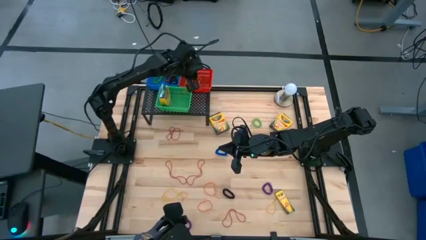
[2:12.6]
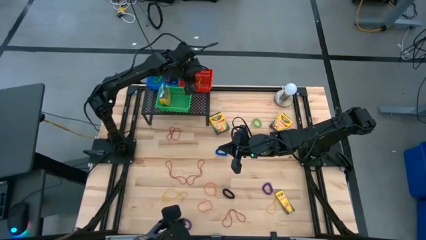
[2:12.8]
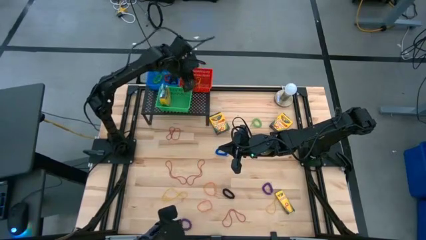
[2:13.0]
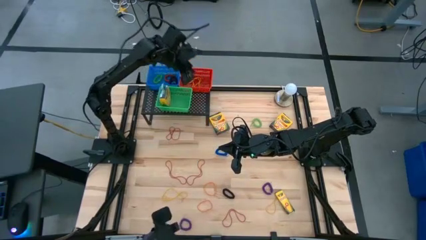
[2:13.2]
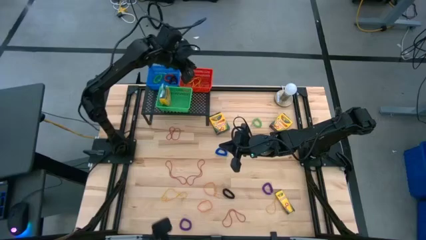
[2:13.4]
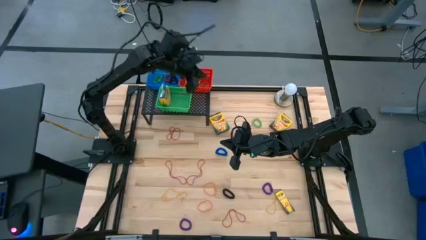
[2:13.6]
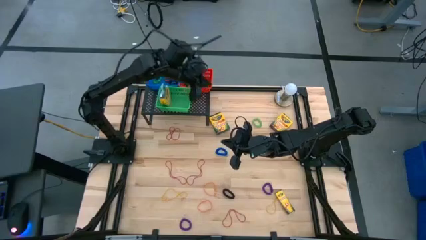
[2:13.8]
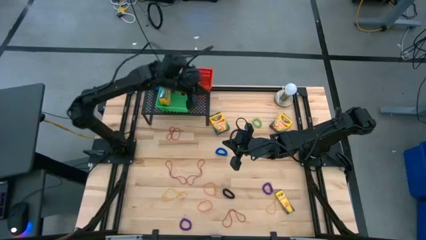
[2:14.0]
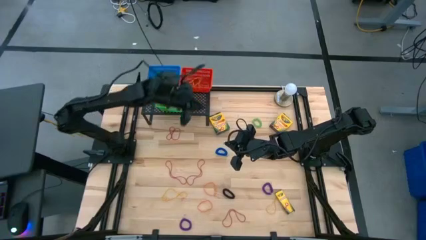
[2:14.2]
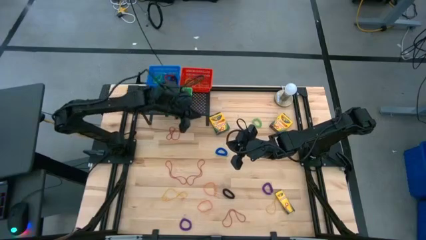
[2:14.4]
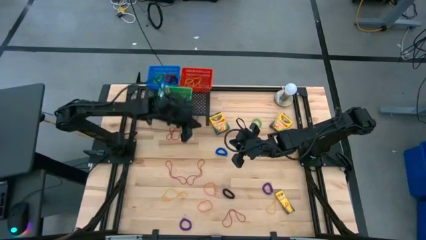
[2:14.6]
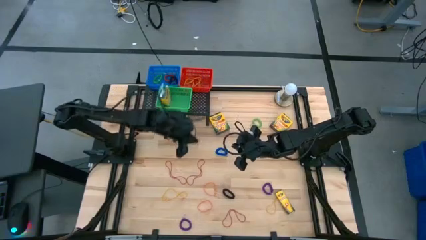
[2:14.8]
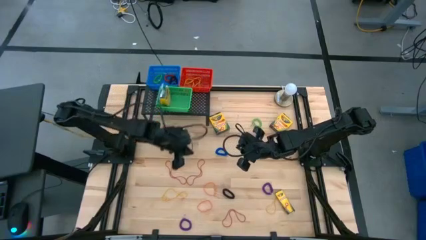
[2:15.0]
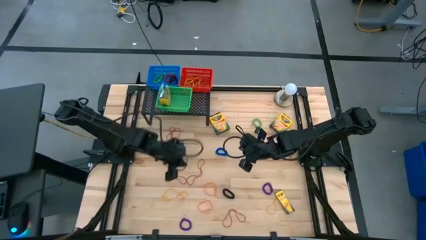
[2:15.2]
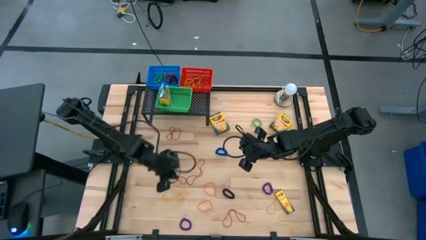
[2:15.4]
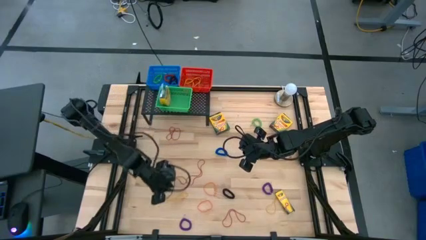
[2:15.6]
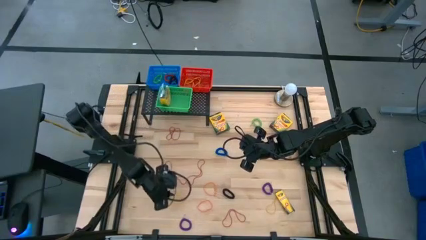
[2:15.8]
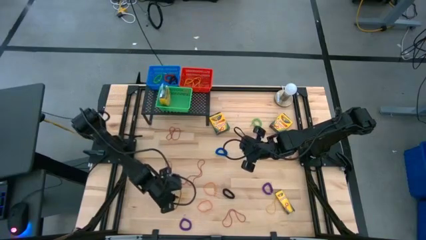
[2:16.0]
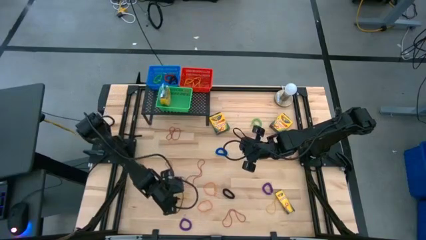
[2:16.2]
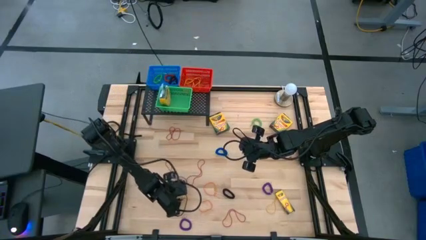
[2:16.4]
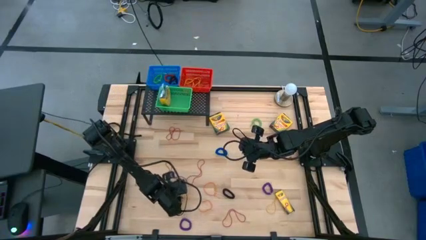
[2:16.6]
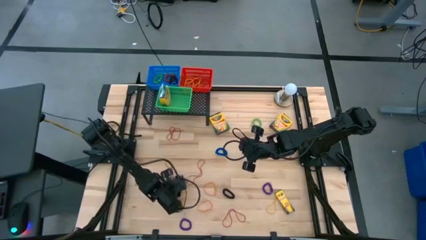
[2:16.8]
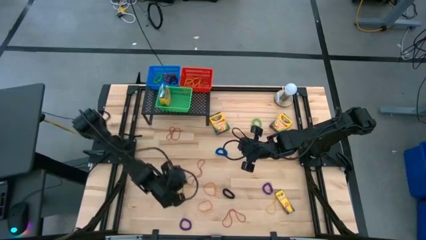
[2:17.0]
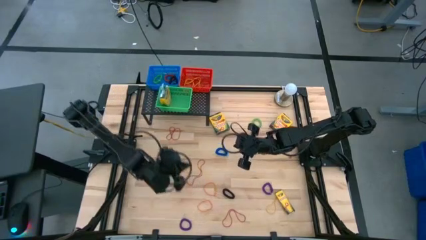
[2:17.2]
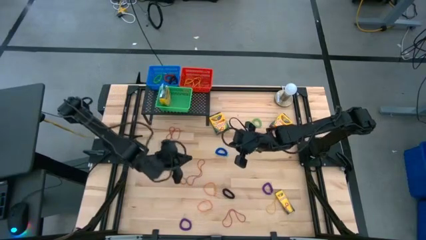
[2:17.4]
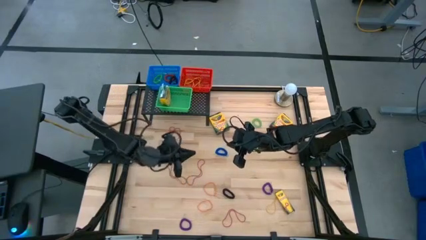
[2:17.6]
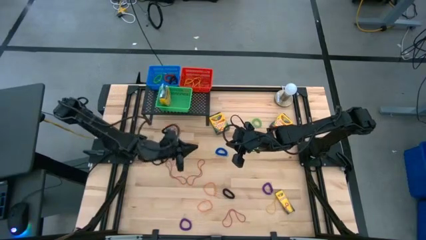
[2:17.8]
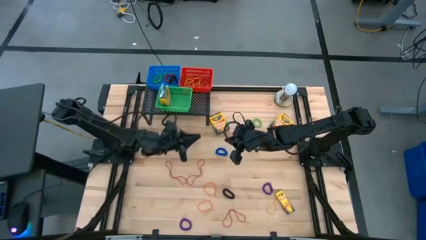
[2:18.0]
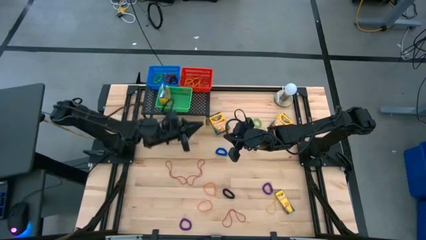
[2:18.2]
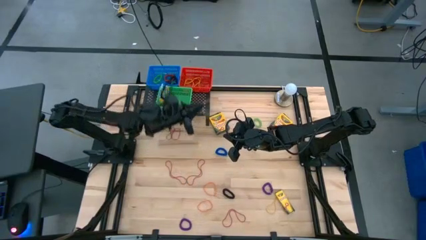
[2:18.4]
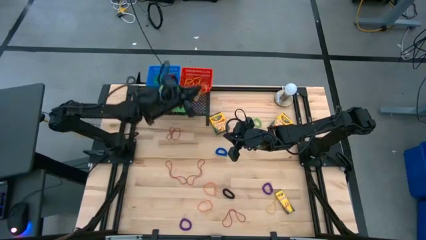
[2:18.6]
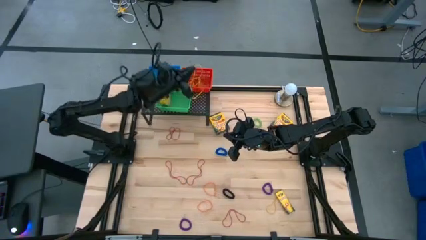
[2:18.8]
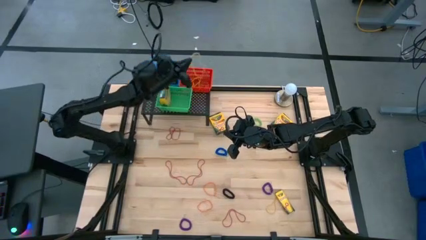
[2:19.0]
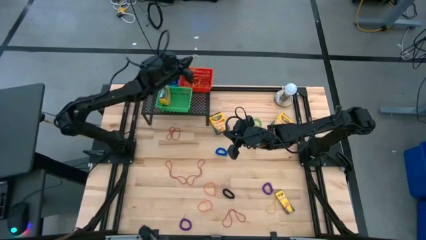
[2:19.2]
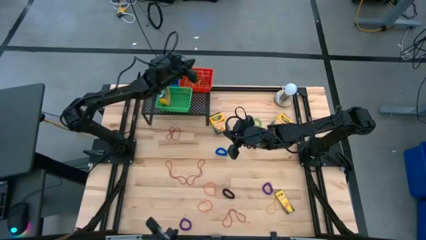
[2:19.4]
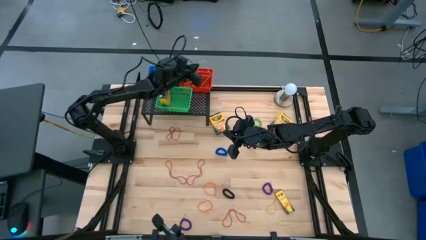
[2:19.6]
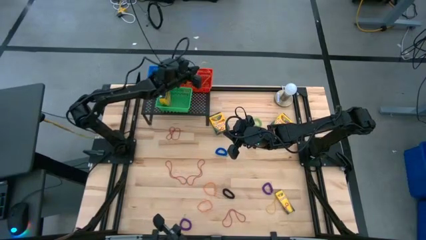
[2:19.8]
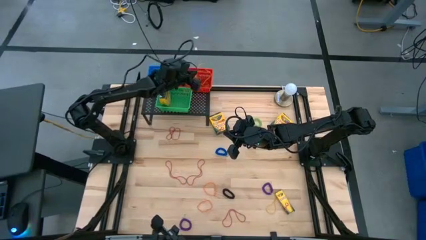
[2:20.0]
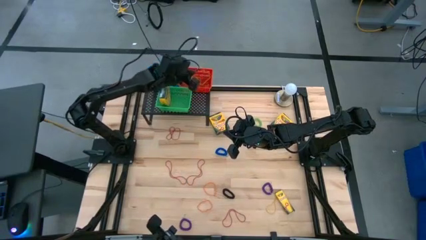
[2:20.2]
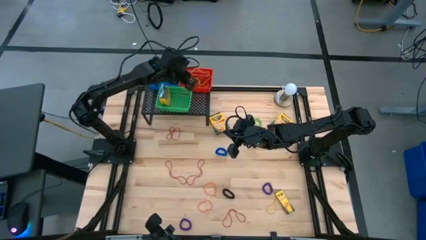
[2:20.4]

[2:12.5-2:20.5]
Task: Pick & Place Office Desk Supplies
Put the yellow rubber band into the red bin

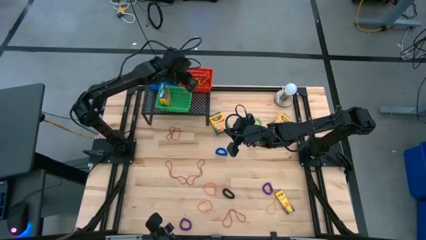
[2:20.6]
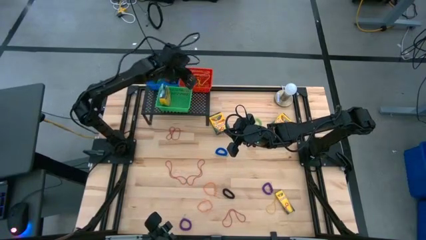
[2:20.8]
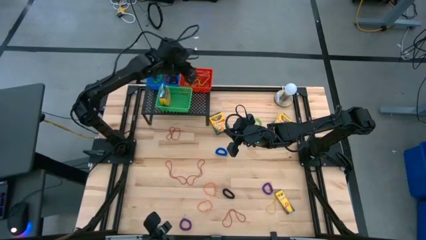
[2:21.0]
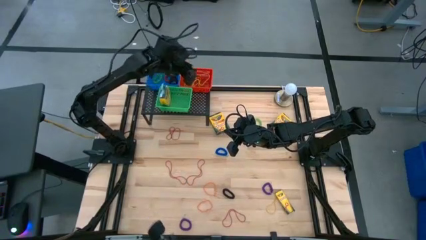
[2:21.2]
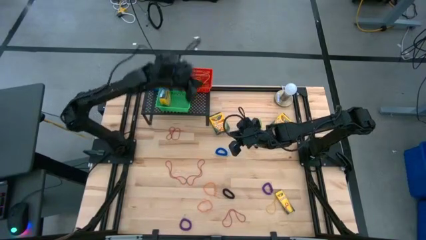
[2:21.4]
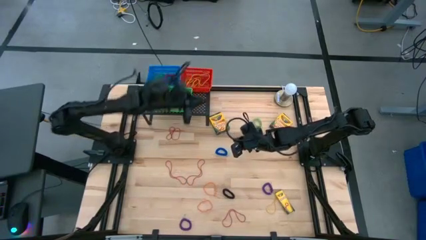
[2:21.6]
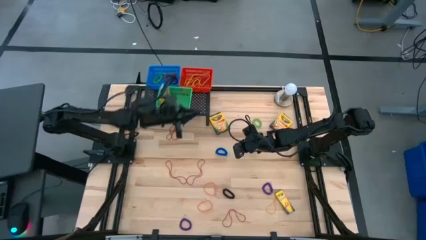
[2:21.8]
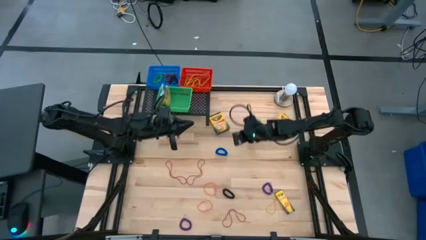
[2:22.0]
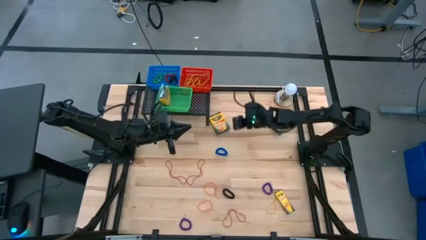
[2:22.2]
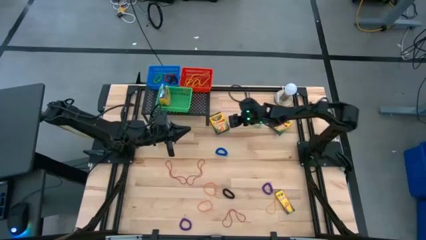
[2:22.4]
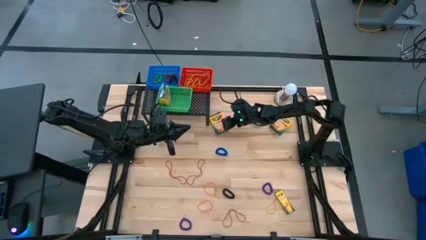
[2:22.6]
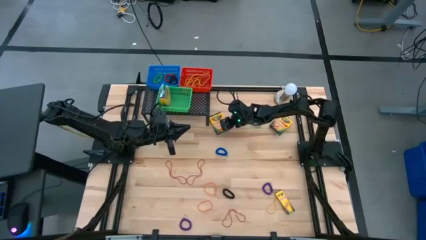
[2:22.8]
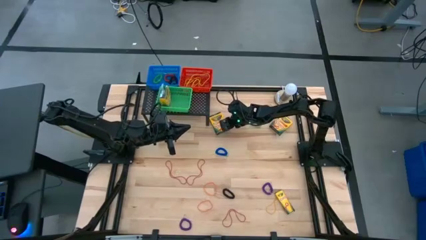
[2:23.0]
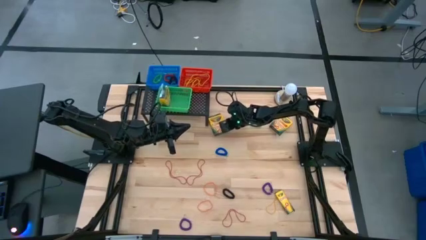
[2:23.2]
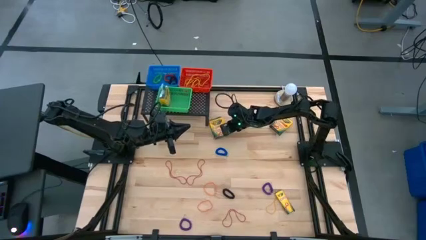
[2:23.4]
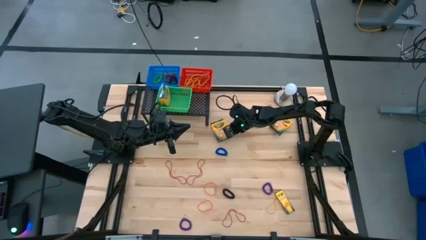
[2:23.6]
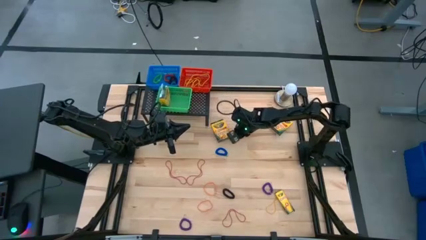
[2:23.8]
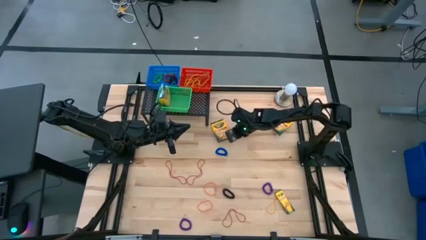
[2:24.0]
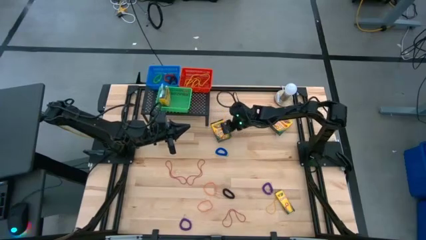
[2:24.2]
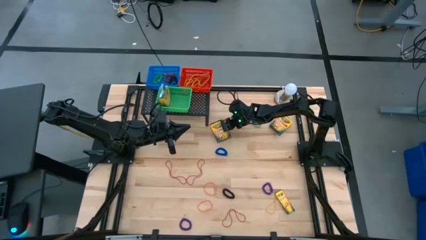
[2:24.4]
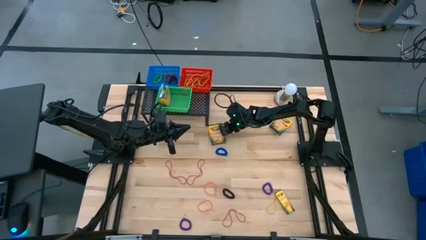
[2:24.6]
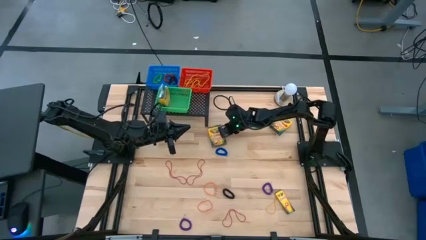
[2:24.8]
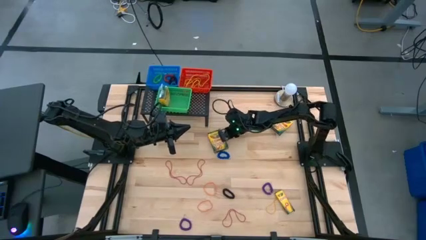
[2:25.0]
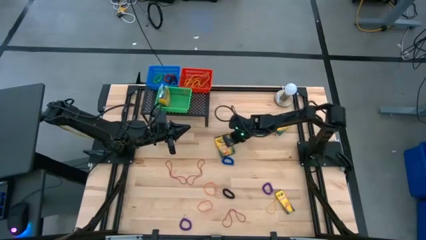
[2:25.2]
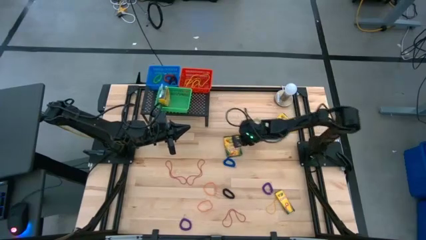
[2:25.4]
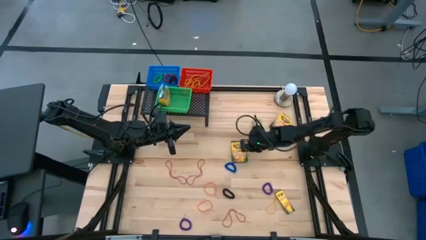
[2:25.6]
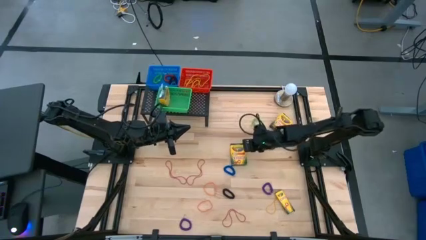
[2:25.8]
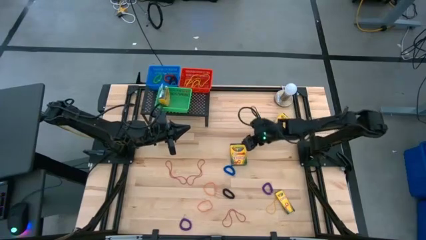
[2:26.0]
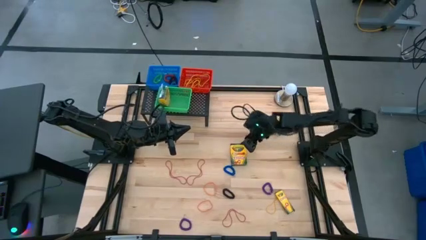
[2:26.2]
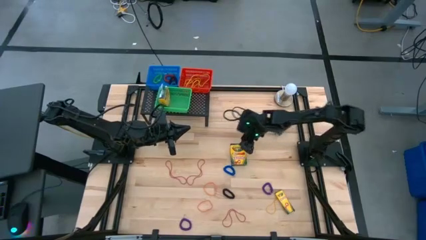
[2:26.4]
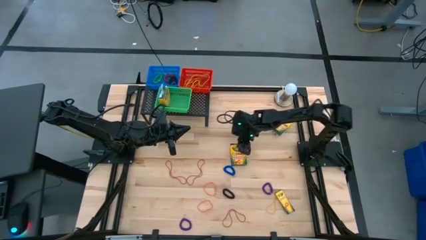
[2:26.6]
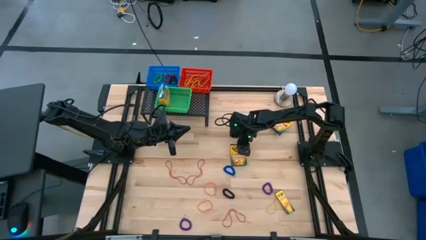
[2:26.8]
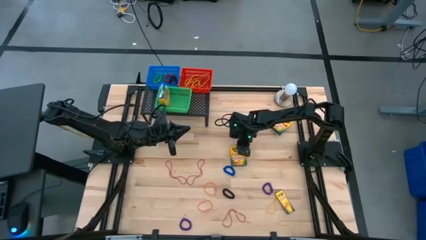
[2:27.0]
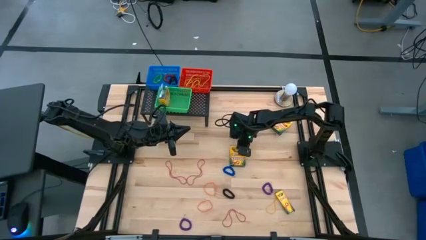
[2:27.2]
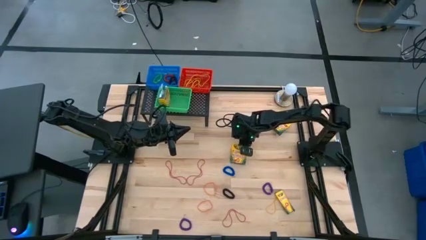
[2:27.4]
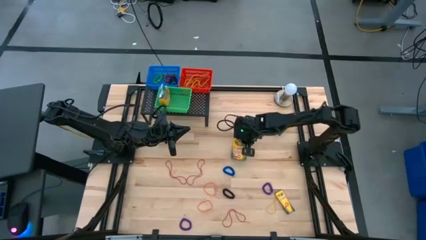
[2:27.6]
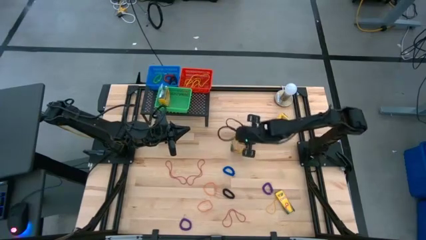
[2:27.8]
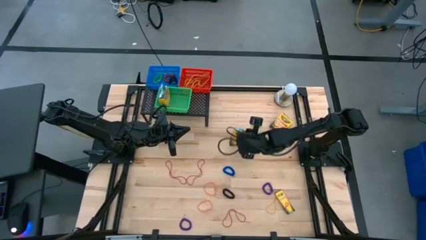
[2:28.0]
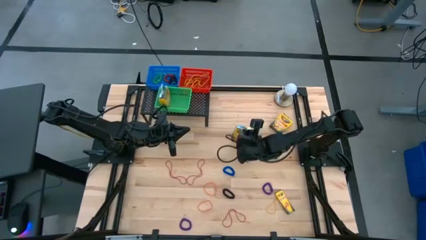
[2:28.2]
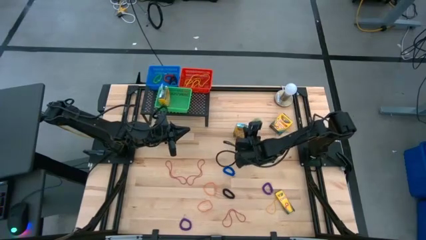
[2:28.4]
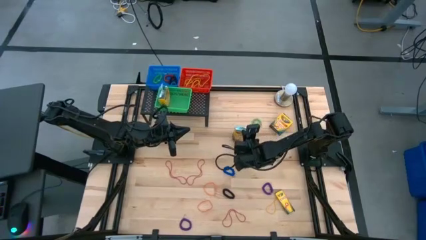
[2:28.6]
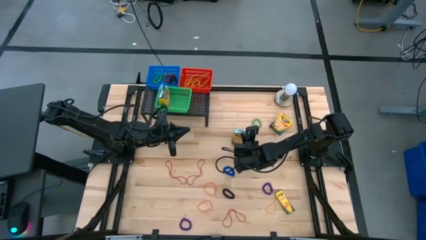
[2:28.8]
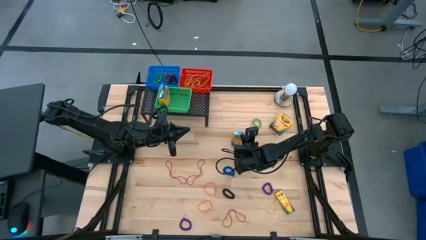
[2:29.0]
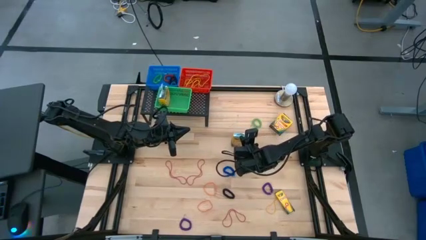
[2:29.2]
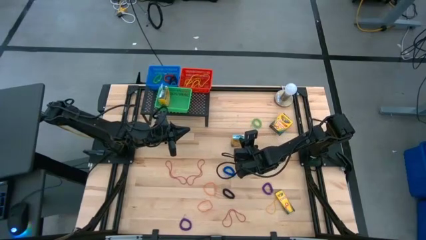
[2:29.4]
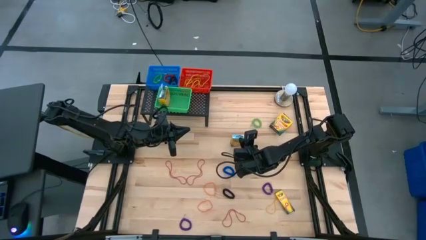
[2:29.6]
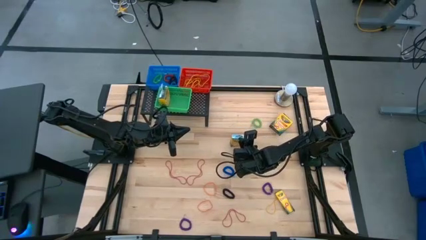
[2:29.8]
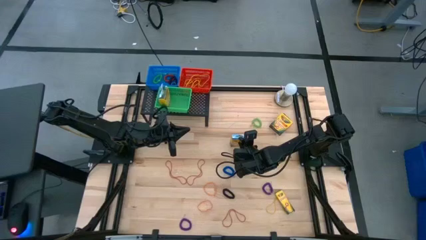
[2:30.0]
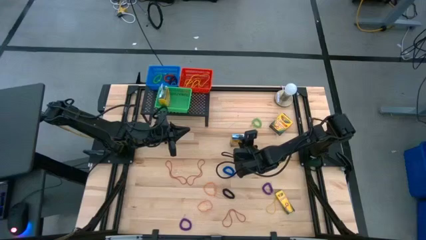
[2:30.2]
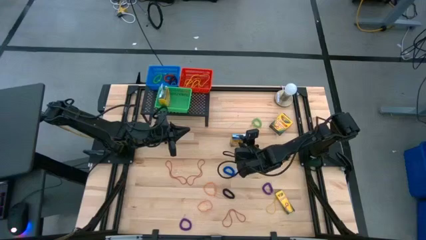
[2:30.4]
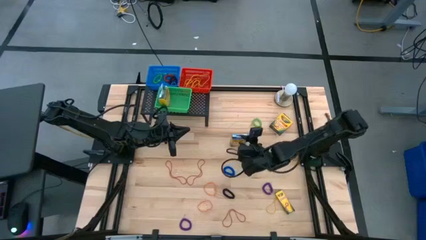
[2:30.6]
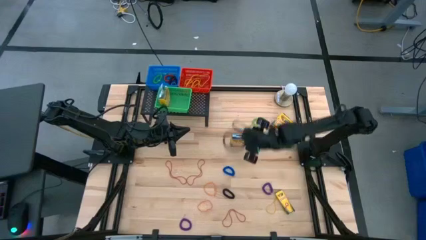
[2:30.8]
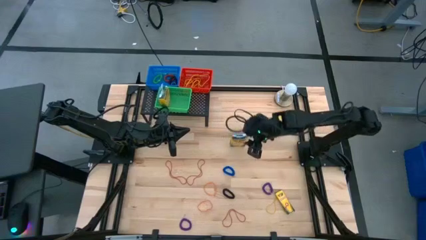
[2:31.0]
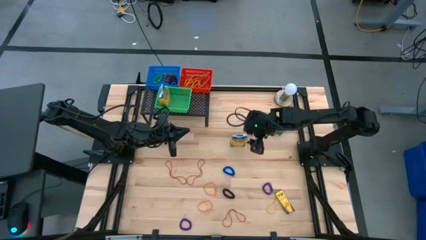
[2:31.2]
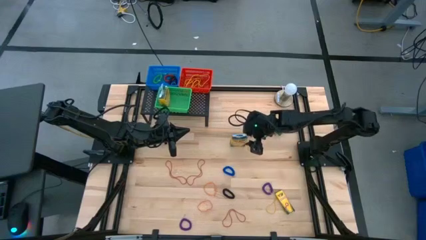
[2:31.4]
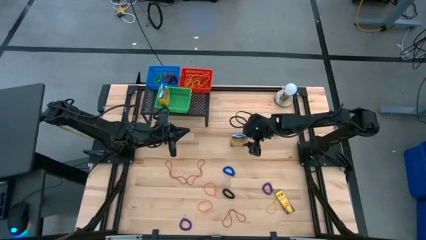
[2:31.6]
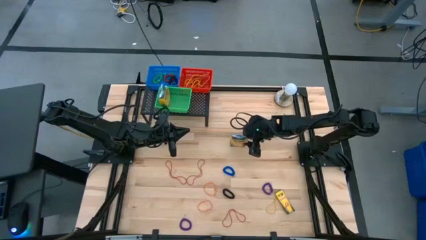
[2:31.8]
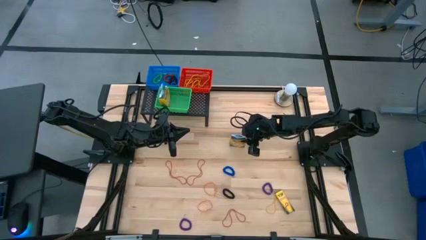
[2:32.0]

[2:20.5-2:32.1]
Put the crayon box into the green bin
